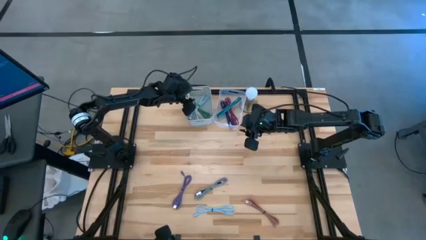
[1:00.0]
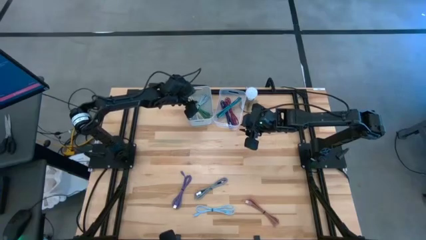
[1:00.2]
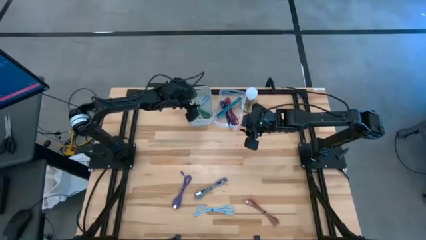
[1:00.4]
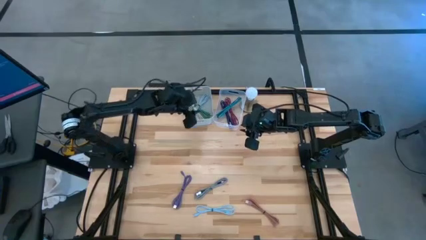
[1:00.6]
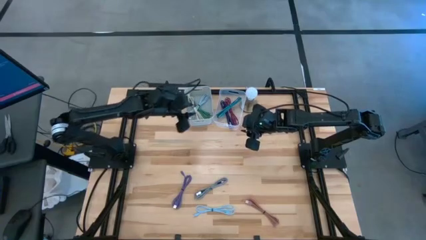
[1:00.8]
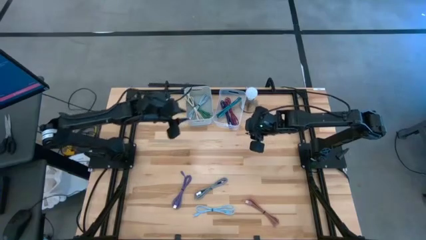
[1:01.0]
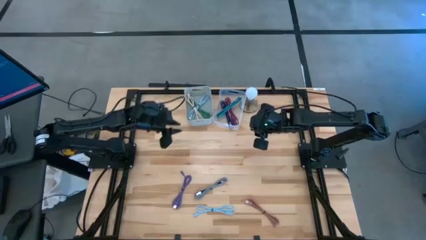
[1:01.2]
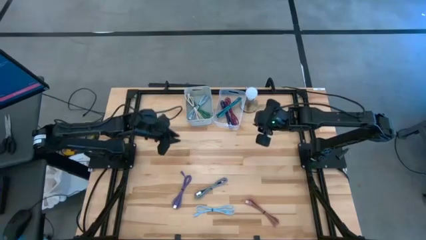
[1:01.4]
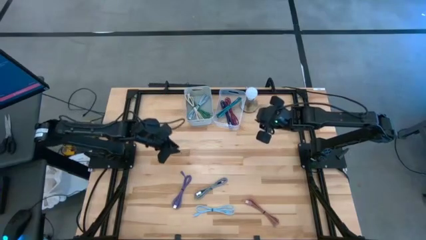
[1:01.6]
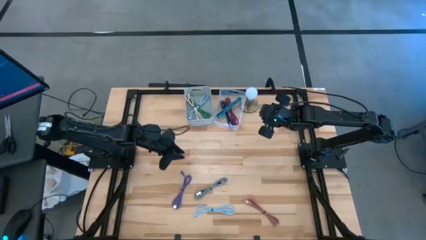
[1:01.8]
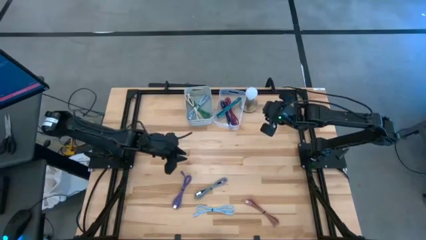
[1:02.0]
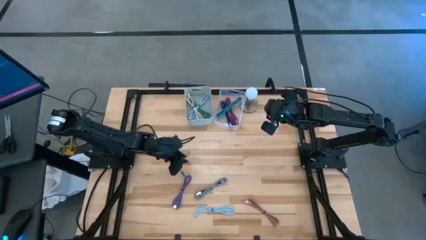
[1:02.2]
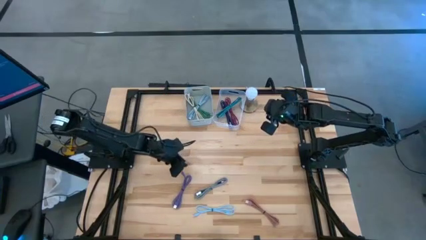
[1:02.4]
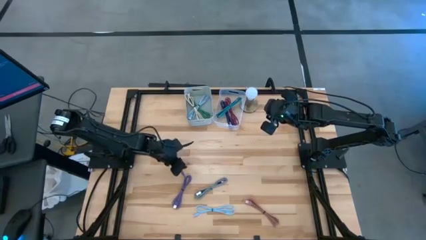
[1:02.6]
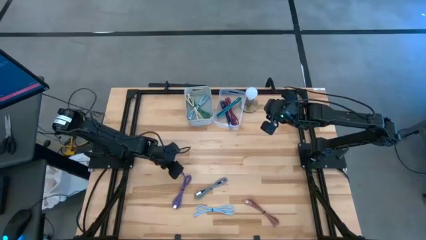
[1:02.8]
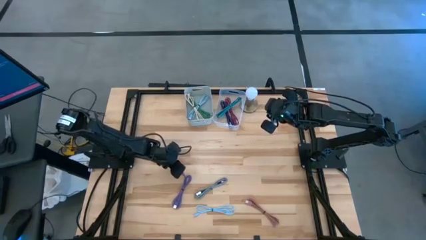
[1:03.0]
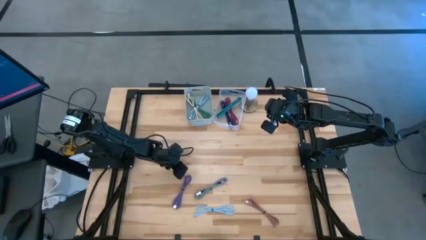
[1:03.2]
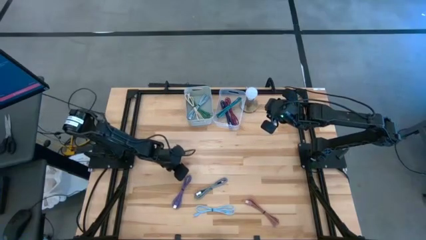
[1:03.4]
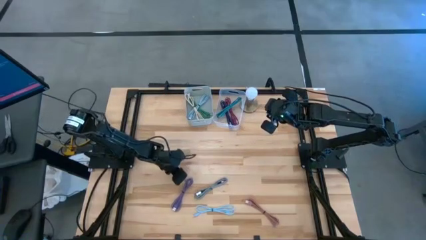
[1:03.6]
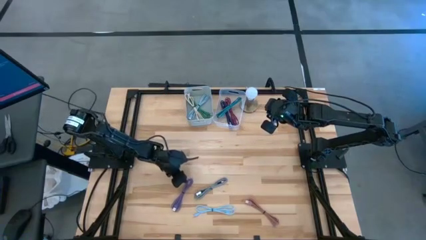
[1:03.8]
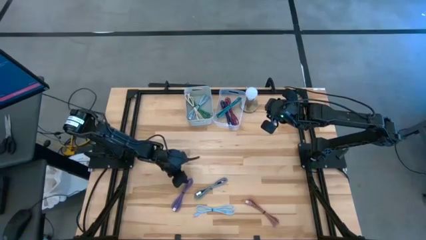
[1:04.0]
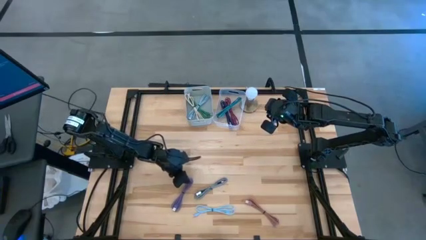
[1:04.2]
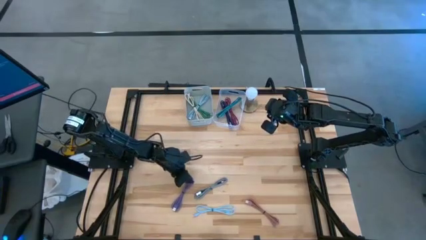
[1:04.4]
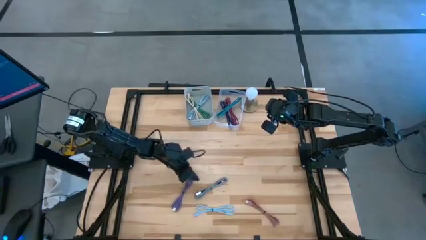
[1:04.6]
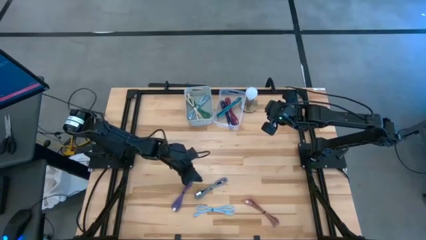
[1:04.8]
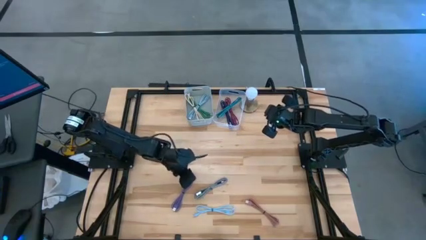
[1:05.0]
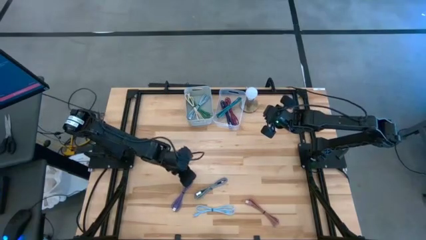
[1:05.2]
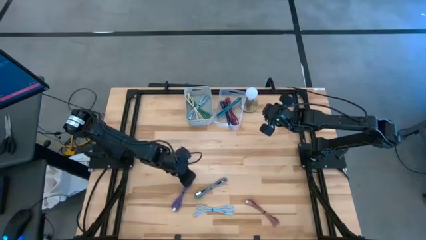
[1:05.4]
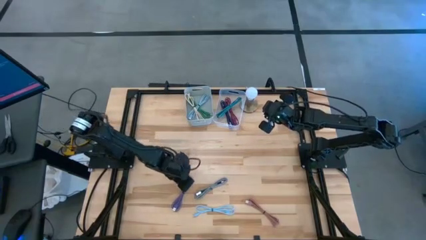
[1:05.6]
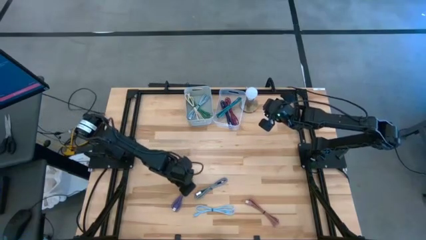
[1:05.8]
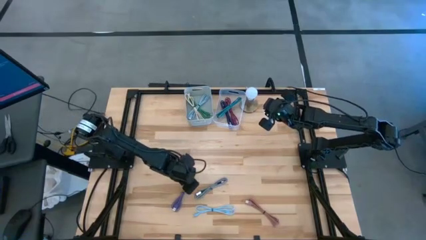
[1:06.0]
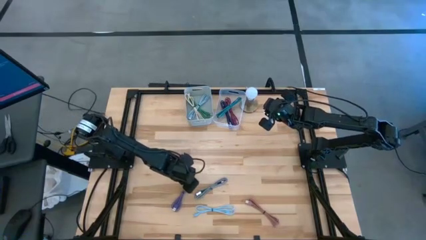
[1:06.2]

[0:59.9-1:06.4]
Task: Pick & Place USB Port
Put the purple charger cable into the white bin

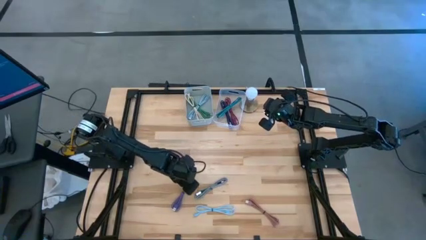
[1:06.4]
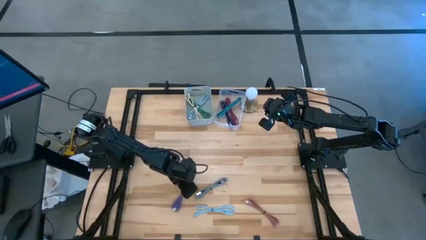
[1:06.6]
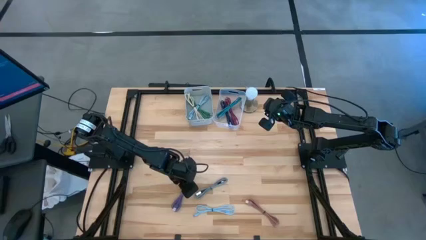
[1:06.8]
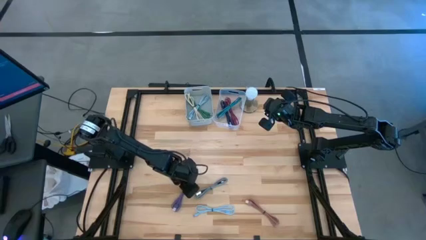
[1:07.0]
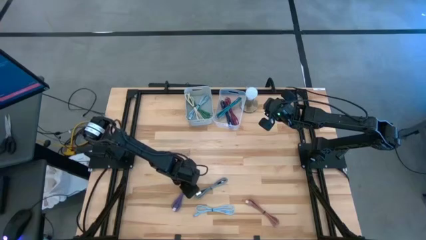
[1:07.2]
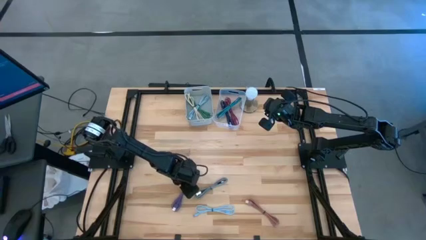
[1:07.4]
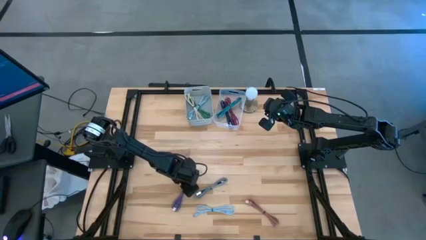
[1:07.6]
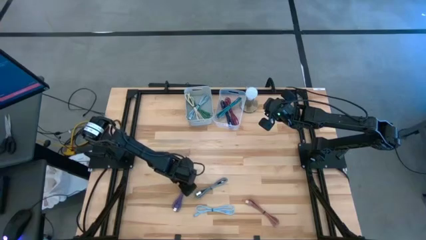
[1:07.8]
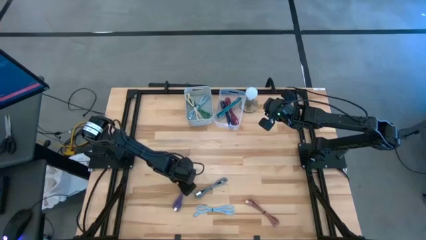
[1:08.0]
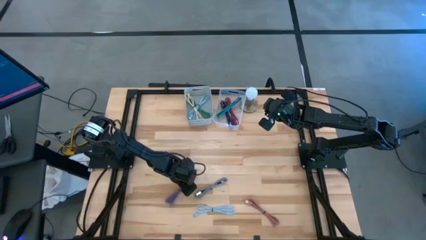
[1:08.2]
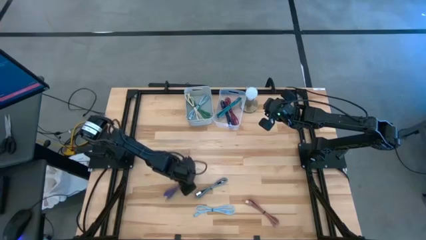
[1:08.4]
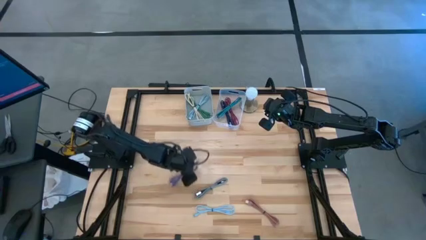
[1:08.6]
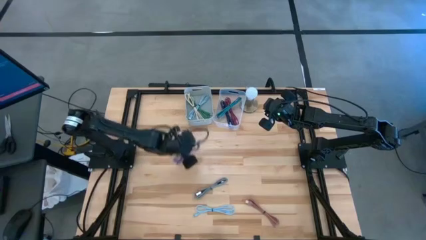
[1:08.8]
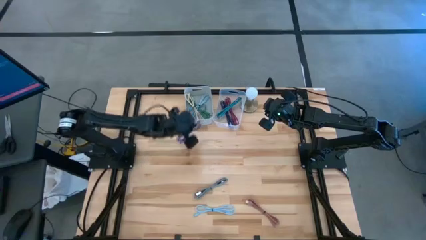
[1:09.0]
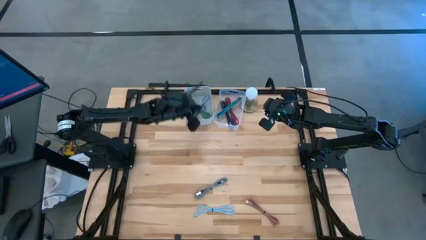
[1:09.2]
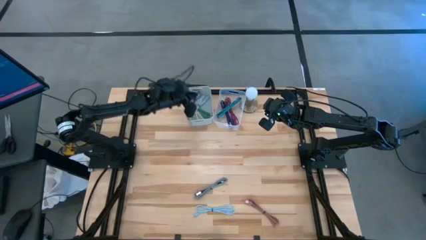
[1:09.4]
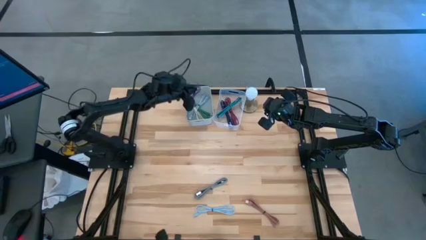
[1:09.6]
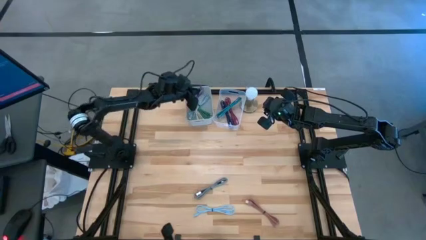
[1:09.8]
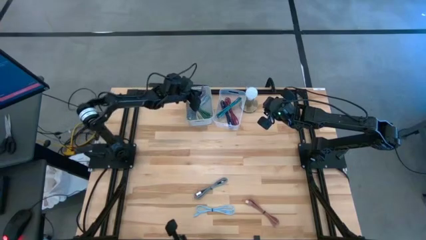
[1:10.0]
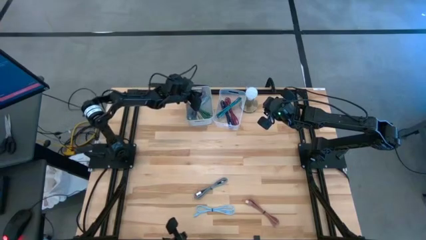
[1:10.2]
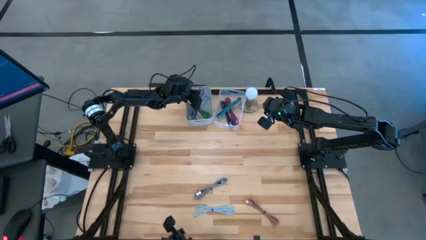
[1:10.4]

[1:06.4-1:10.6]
Put the purple charger cable into the white bin

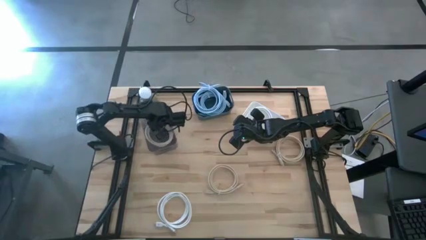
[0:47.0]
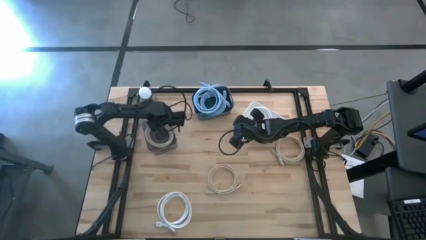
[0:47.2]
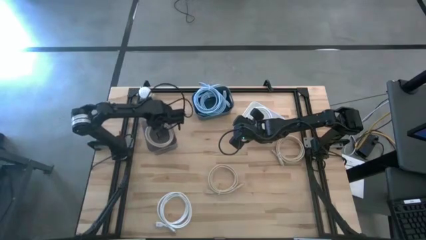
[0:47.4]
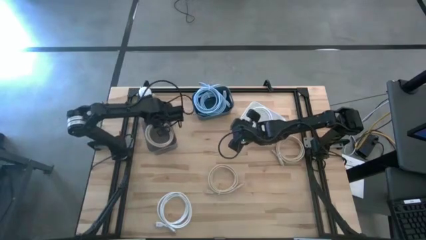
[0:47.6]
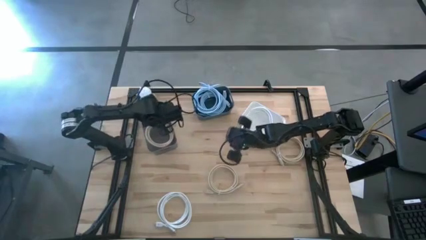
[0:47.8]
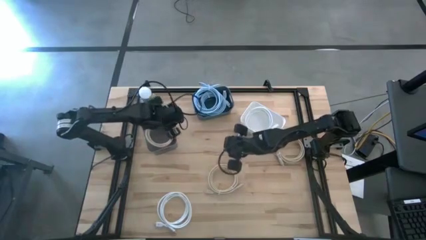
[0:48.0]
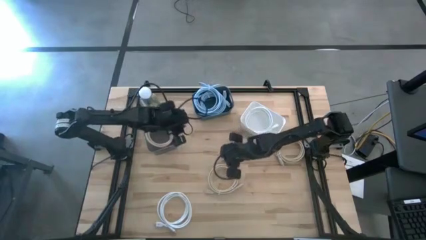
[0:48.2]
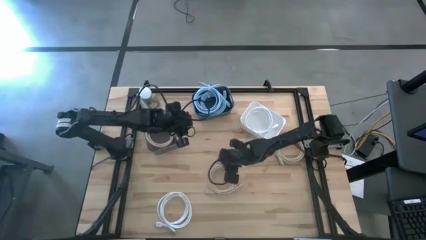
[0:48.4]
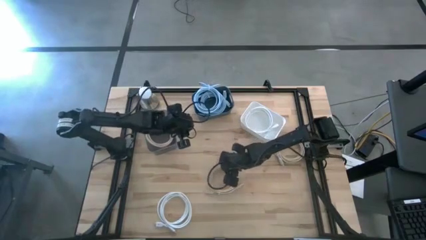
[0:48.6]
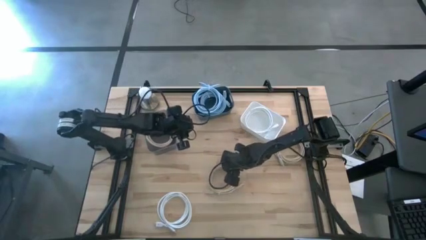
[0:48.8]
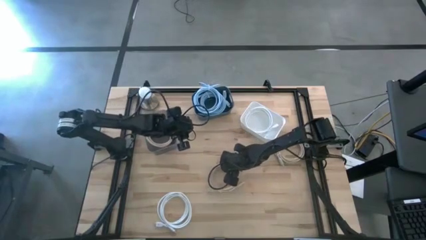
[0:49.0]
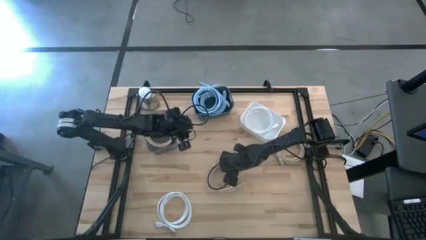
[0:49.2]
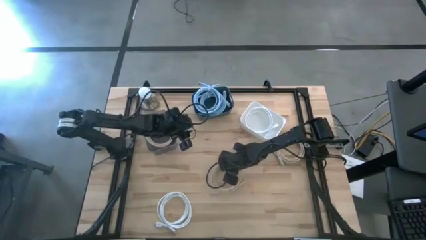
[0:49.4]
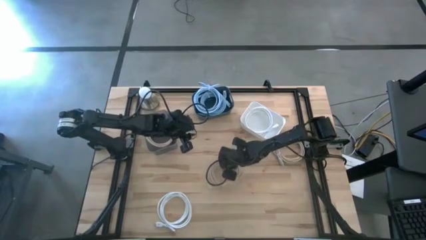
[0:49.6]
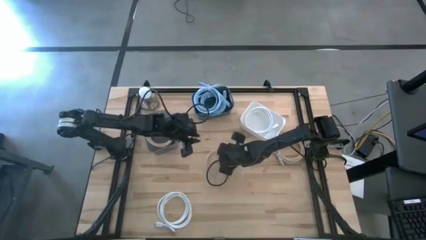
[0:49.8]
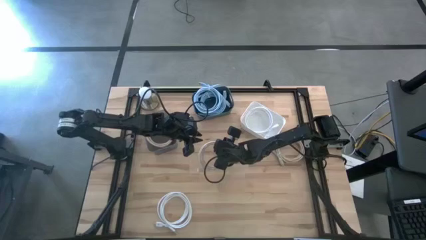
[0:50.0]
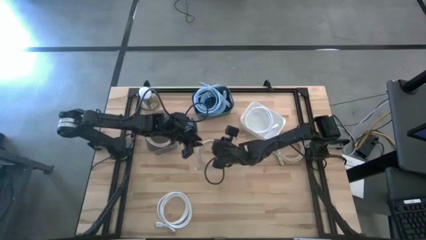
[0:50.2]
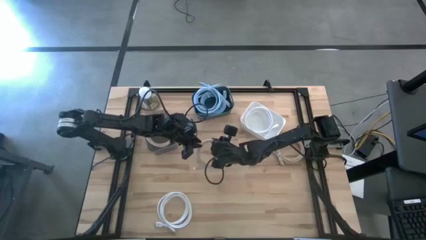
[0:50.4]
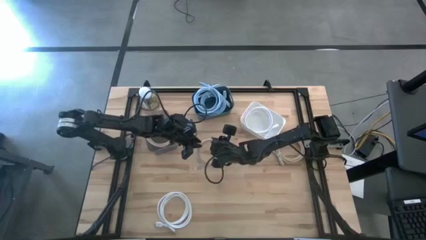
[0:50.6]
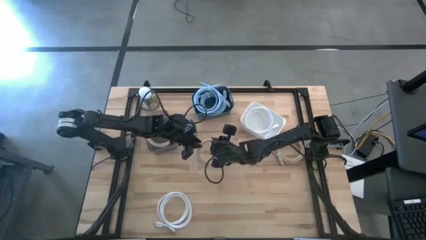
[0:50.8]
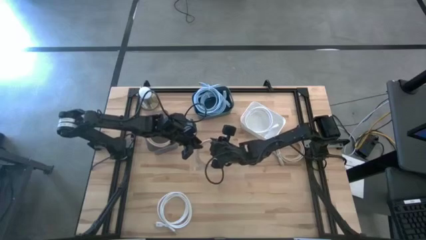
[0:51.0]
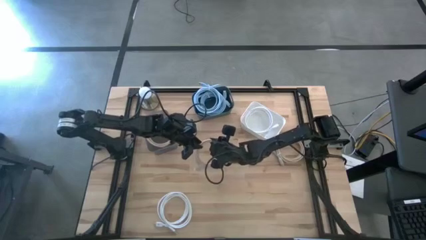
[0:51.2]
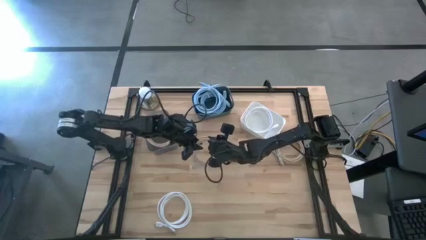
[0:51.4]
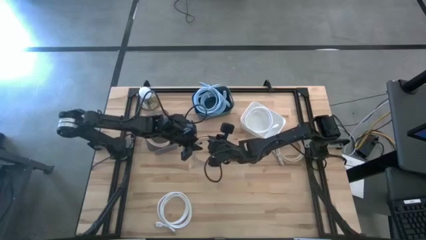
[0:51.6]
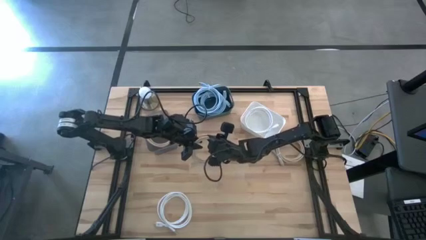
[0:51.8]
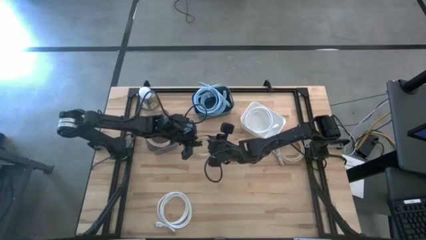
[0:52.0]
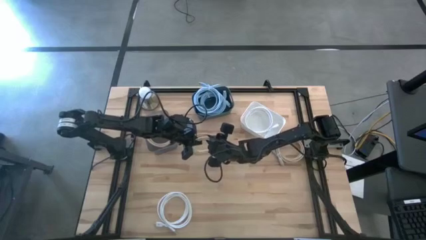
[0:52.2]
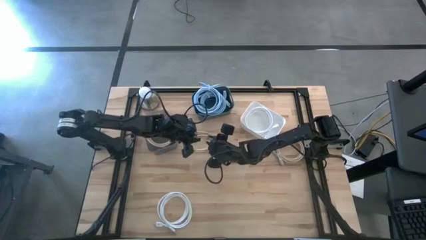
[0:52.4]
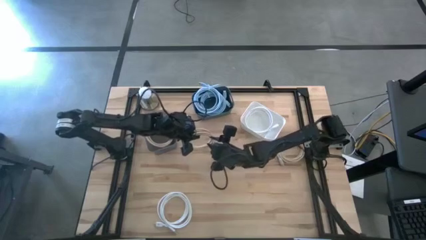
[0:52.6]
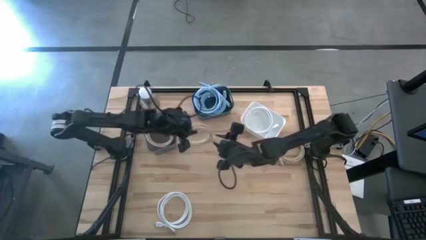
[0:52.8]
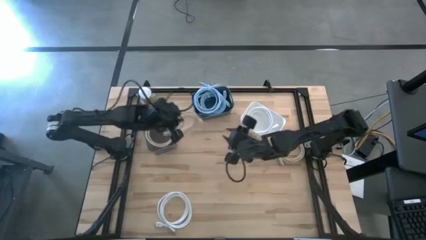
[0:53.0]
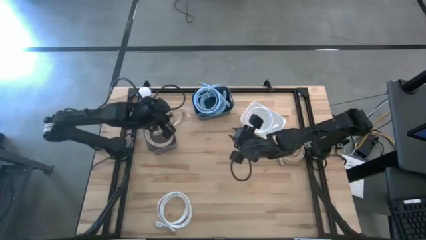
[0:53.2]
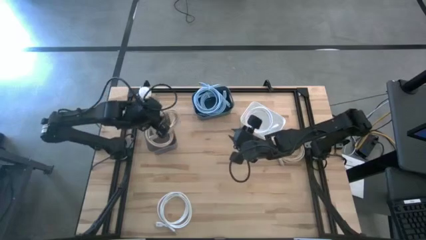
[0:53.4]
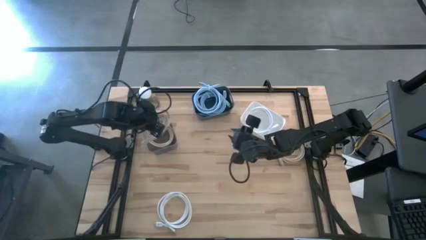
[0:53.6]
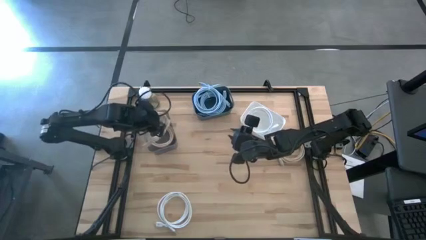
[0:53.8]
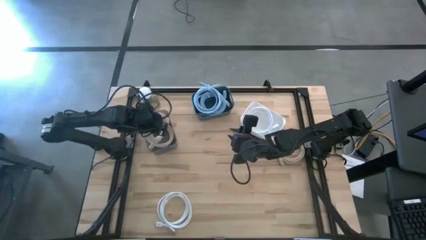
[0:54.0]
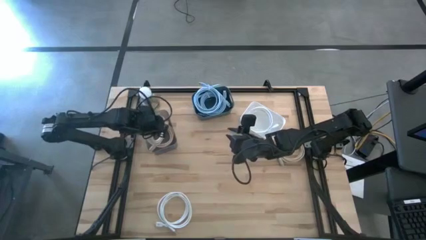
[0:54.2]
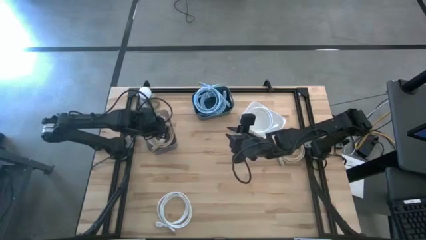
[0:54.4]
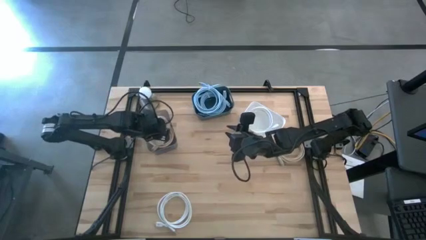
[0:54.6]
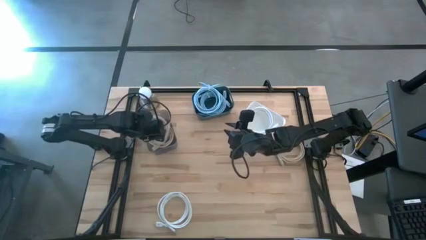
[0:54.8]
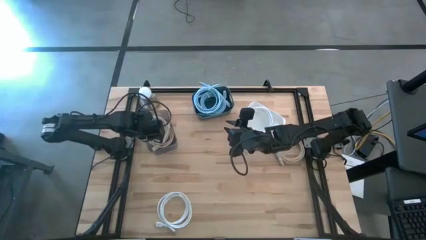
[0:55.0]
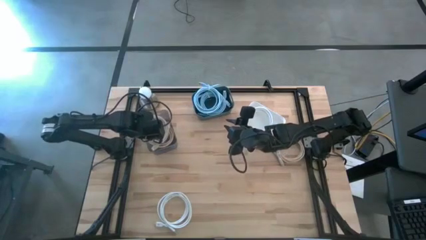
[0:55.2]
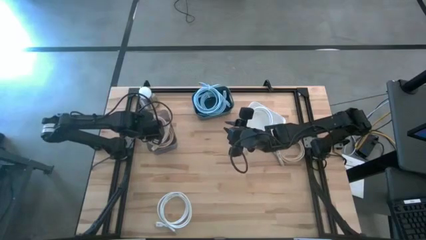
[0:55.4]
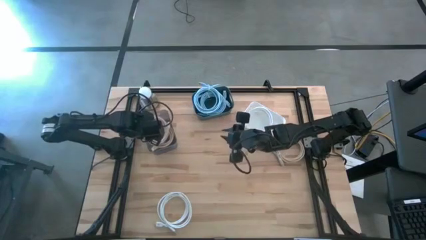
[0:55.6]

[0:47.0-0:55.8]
Task: Sort HDMI cables
Put the left brown HDMI cable into the black bin
